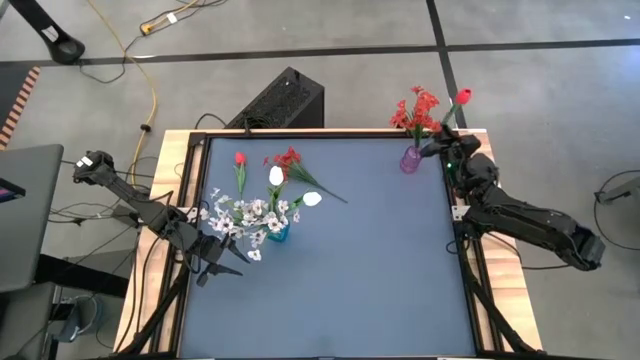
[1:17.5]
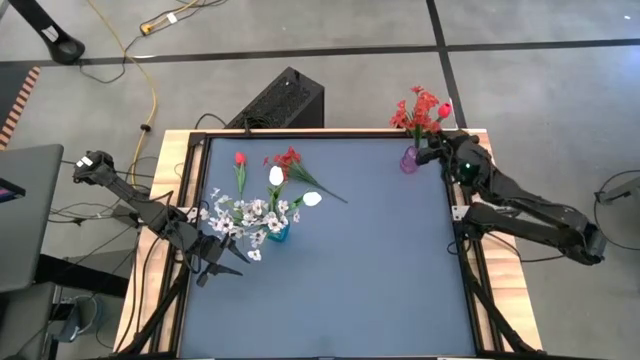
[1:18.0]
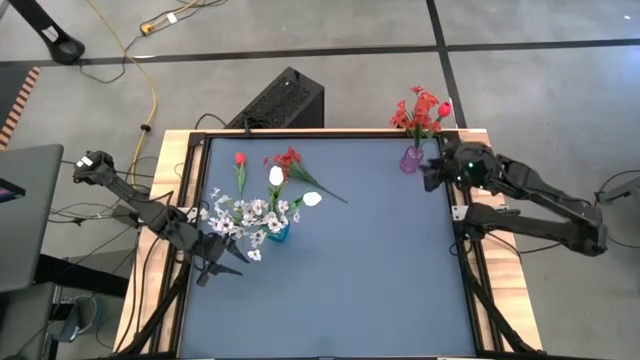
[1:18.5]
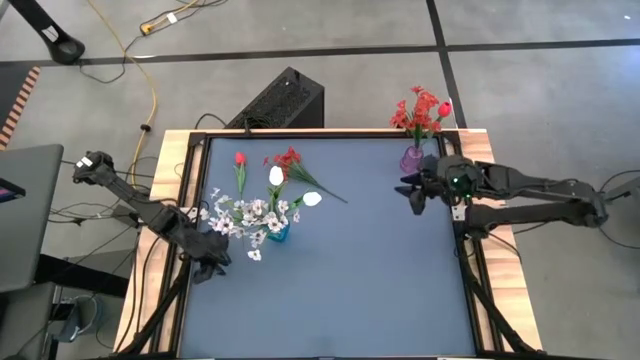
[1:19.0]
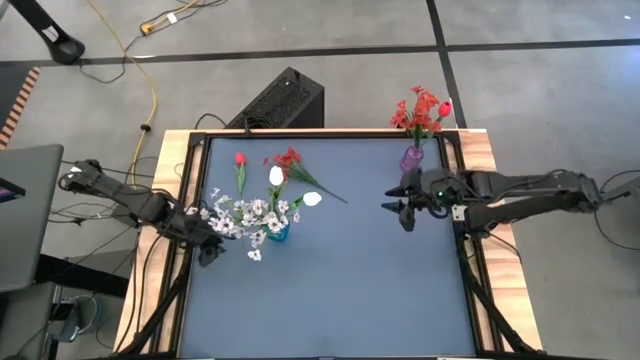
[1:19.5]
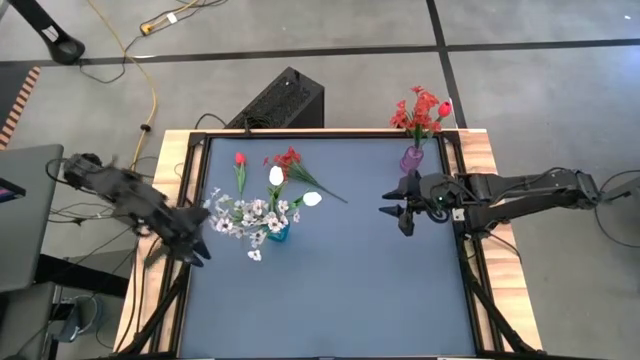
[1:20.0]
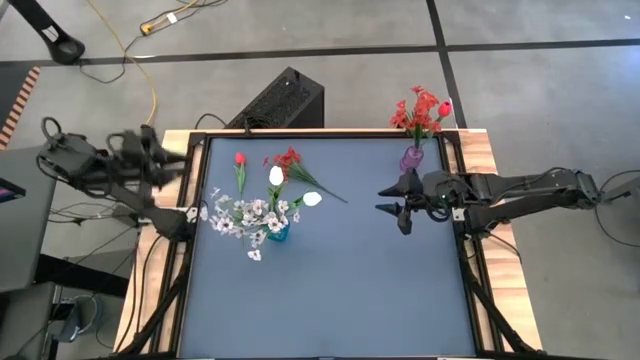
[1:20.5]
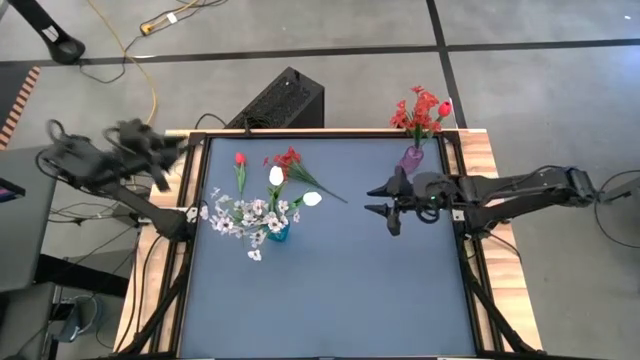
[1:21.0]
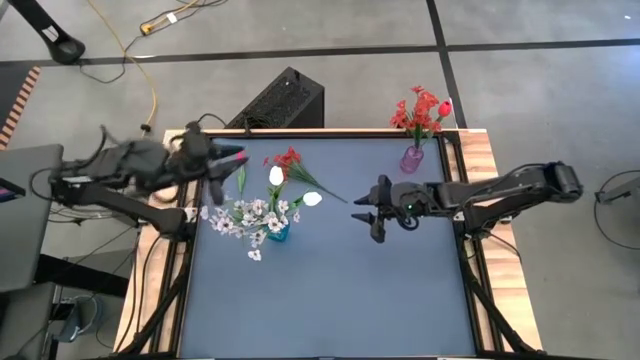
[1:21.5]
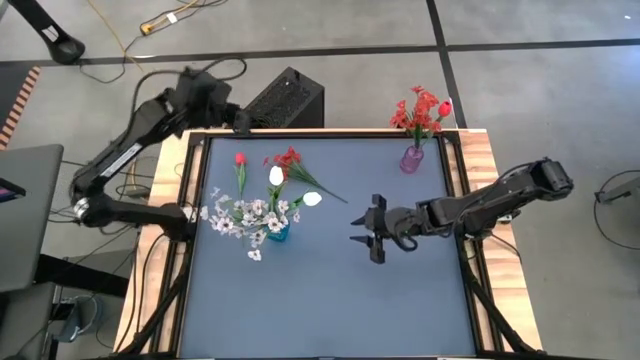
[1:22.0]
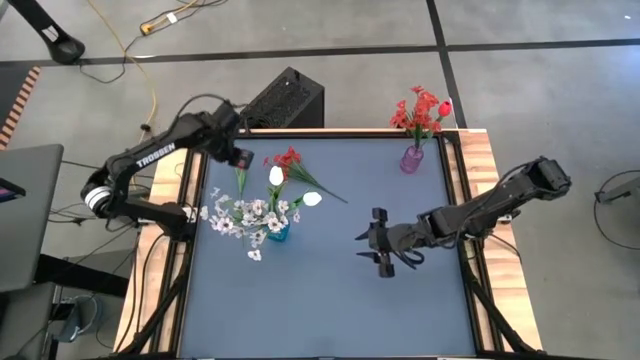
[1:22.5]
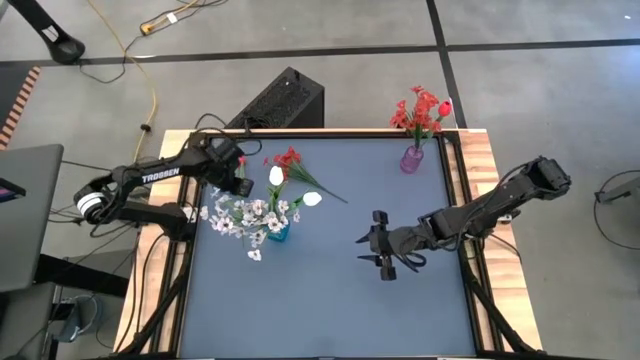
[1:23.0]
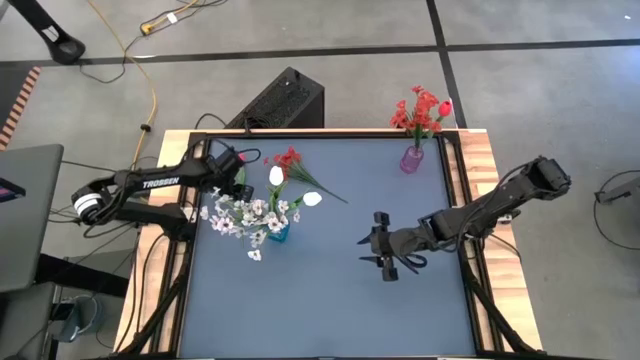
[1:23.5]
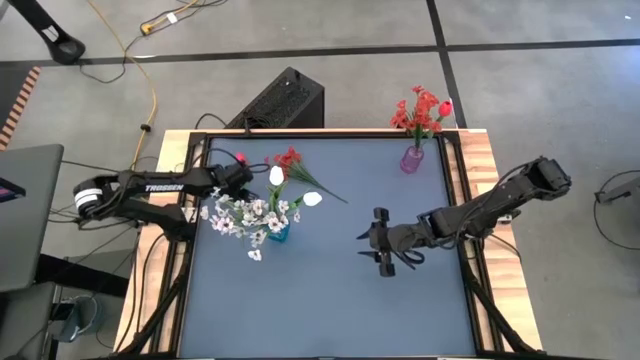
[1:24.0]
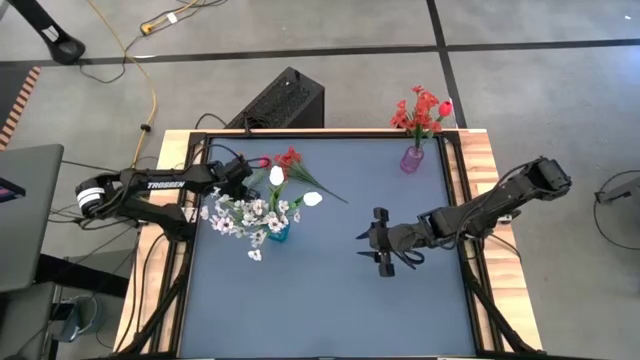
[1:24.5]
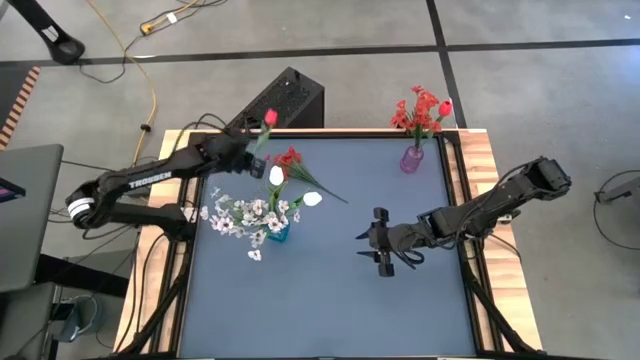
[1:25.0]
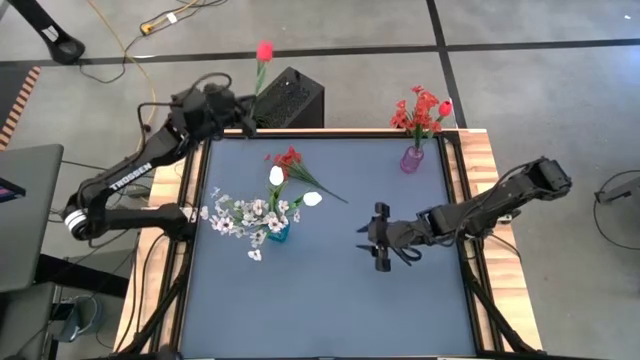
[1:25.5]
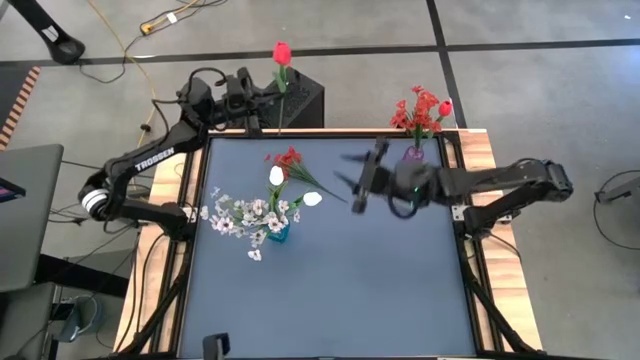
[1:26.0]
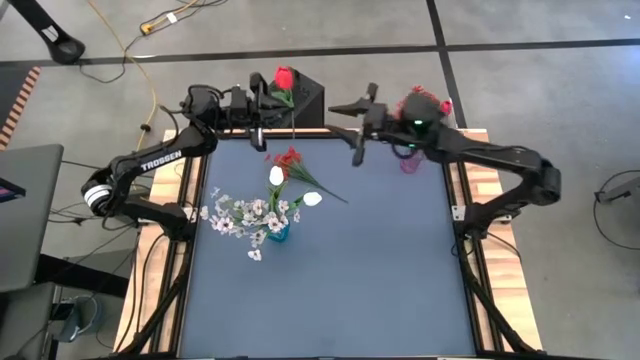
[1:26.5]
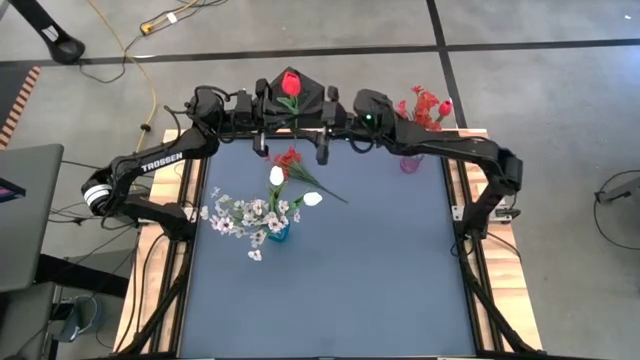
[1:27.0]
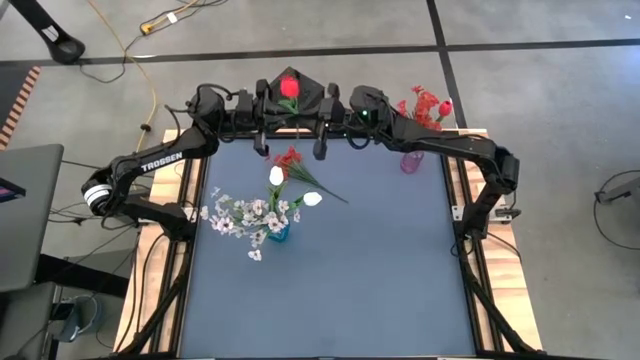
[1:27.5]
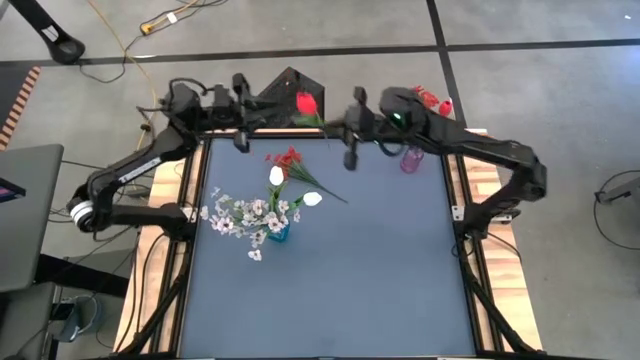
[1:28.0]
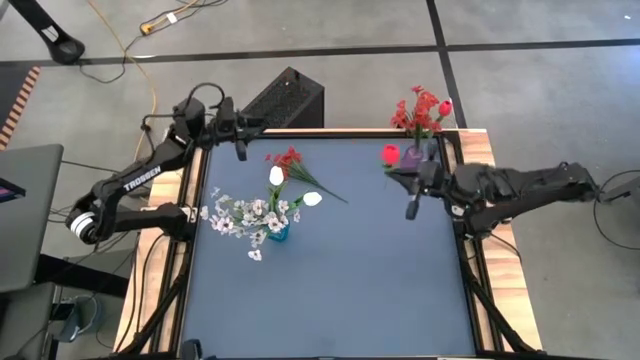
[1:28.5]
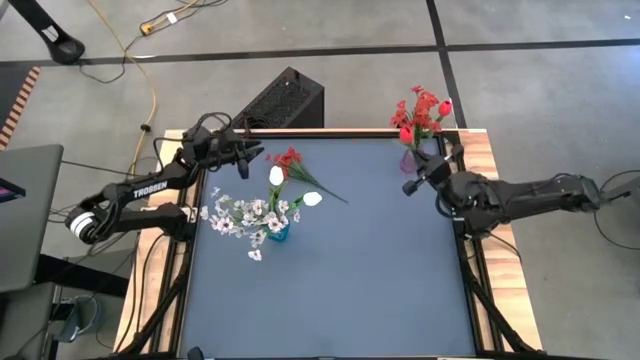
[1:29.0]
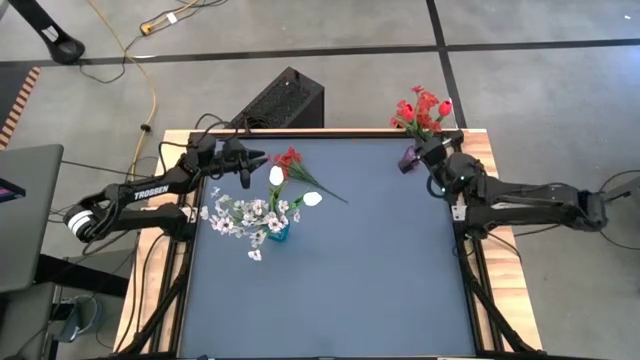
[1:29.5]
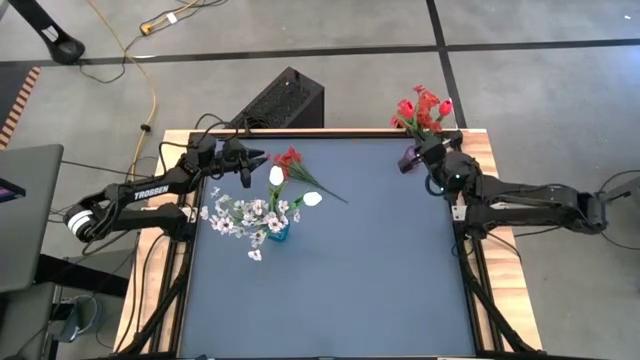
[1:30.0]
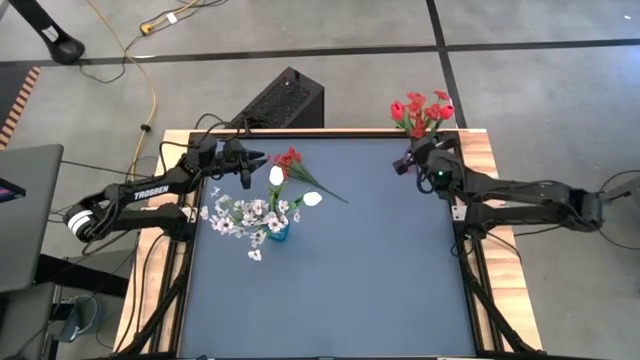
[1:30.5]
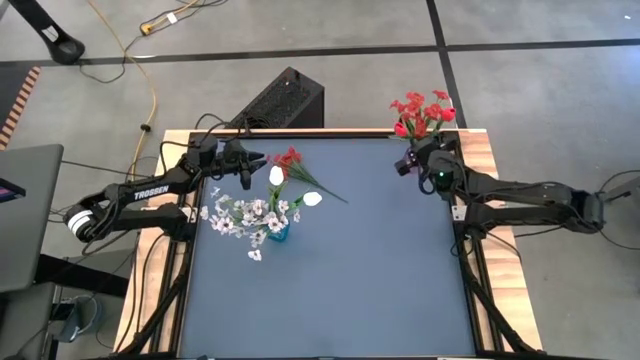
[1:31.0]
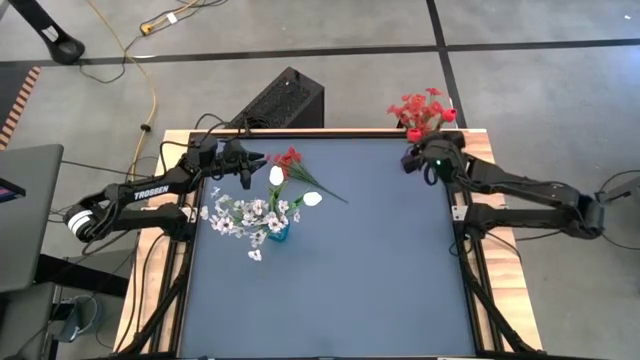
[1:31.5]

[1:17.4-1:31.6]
Task: Sort flowers into vase by color
Put the top left red flower into the purple vase

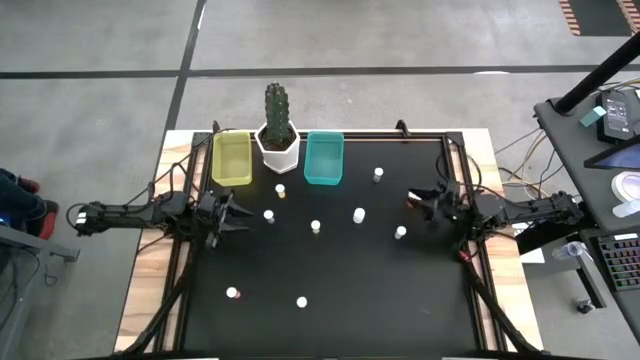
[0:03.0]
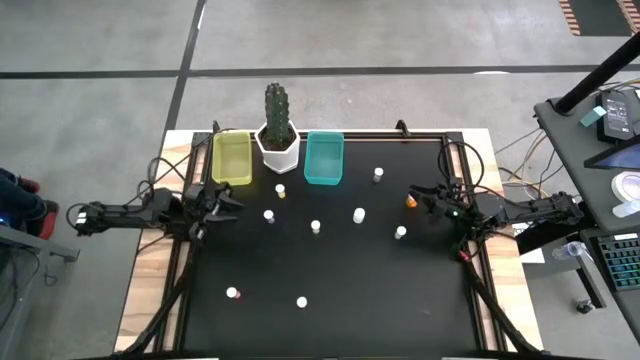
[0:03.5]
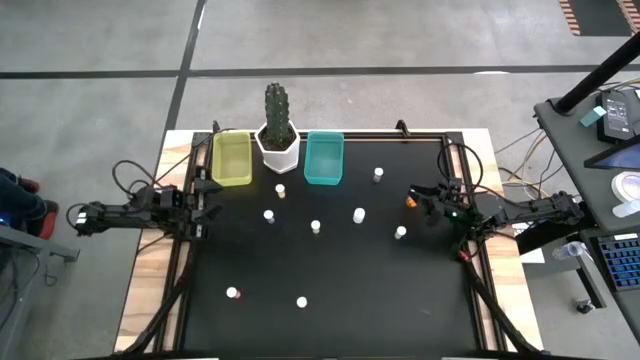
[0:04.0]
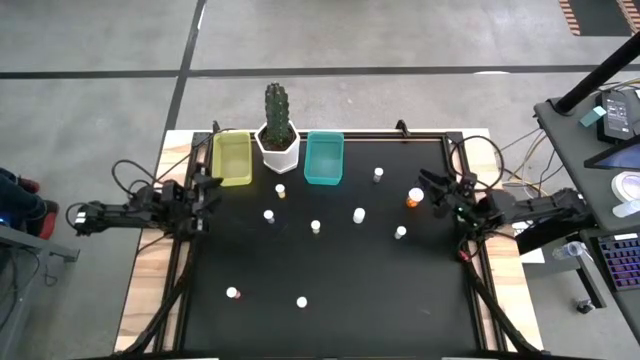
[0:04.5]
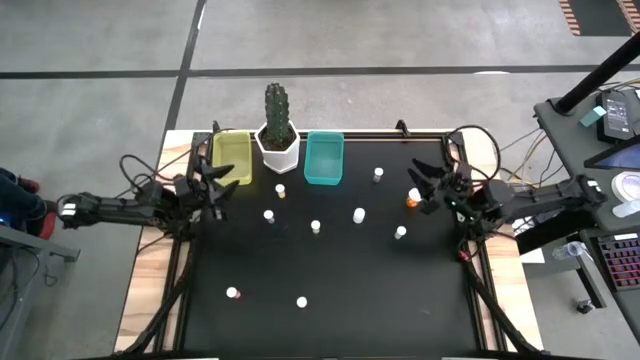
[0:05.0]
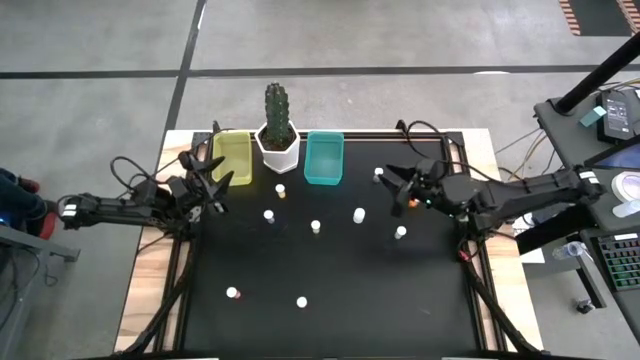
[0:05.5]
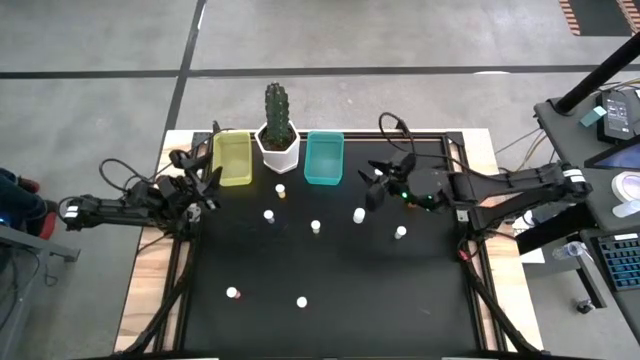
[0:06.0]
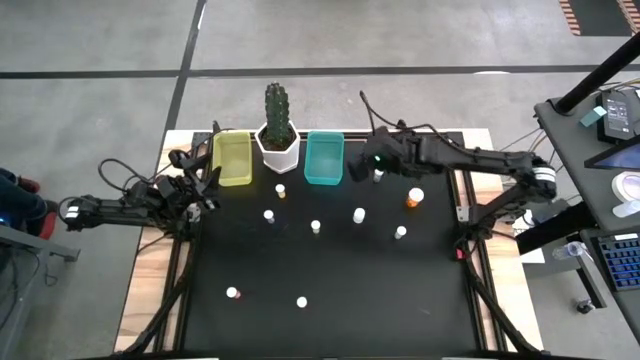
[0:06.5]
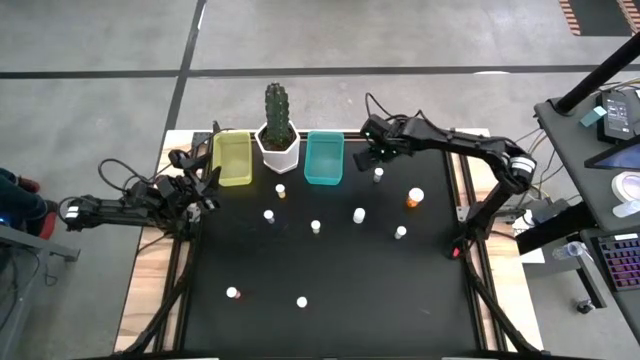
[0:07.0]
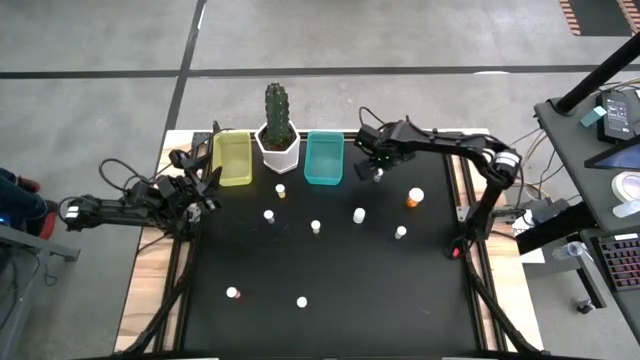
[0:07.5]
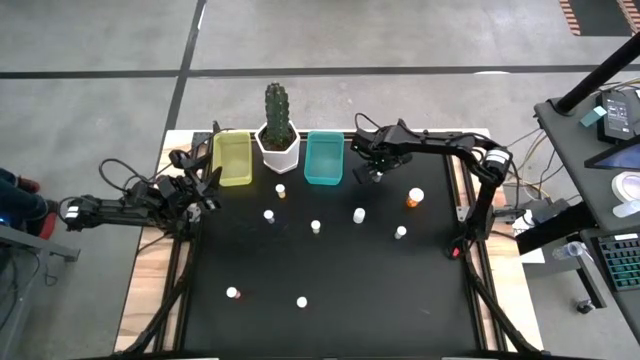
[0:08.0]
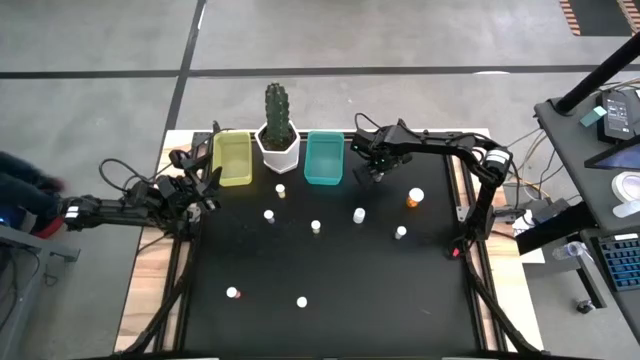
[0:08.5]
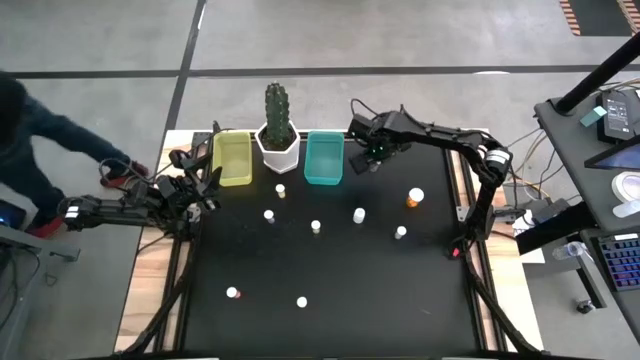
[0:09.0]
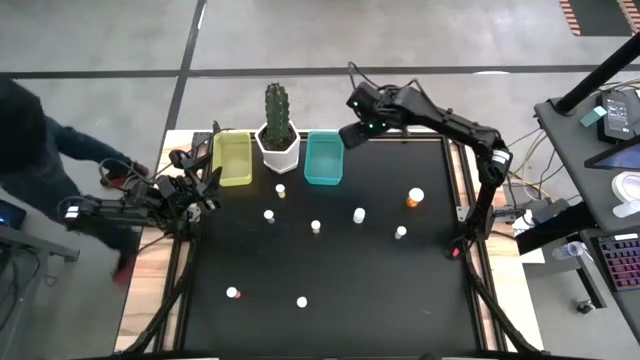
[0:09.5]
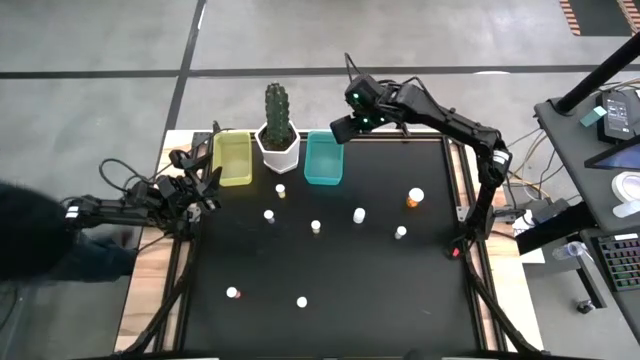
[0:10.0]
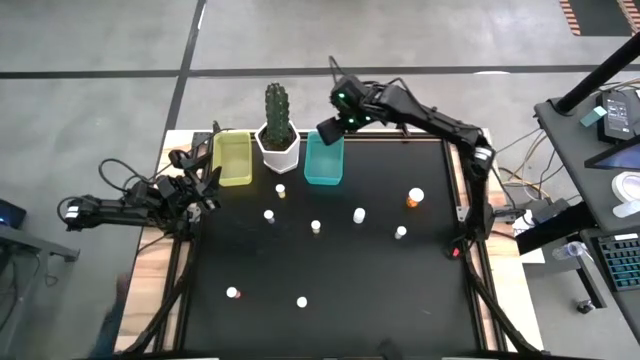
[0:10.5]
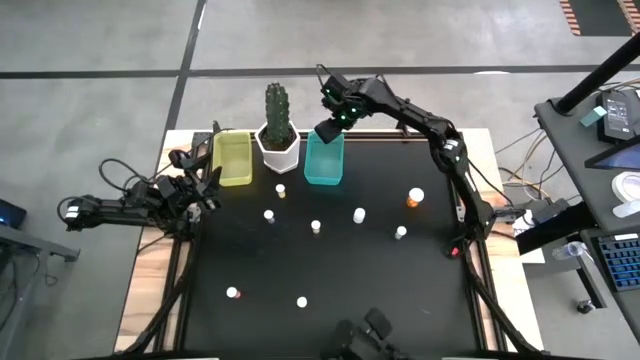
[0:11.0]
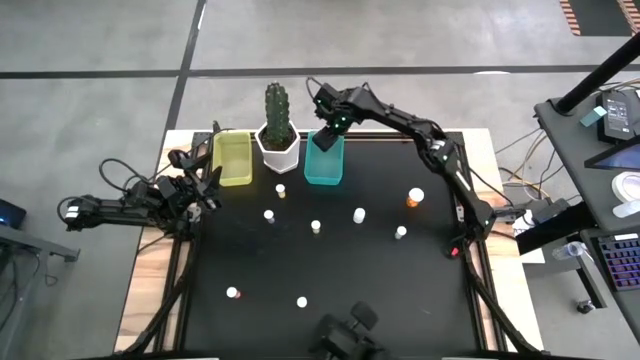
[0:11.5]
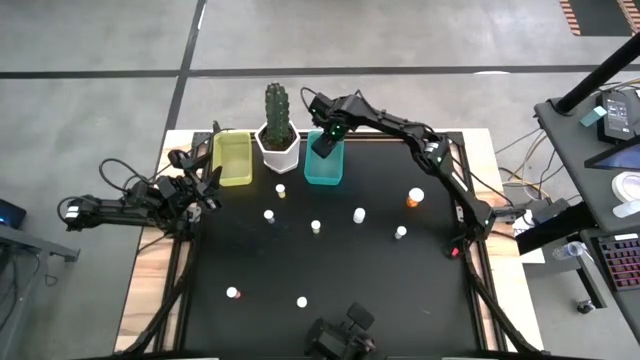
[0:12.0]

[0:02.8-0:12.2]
Task: Pick and place medicine bottles into bin by pill shape (circle, oval)
Put the light blue tablet bottle into the blue bin
